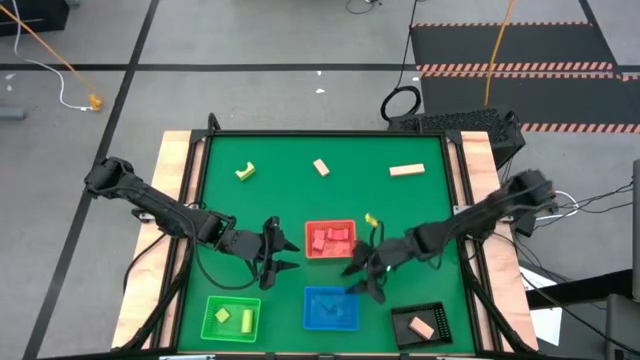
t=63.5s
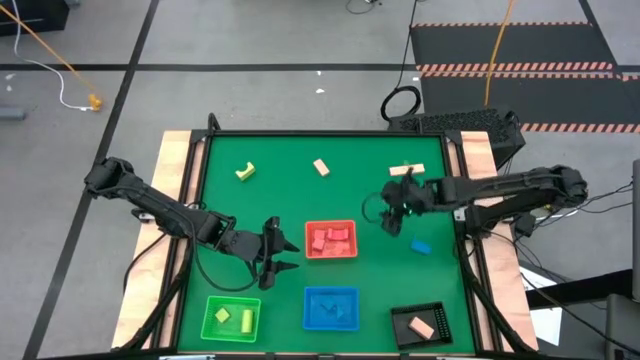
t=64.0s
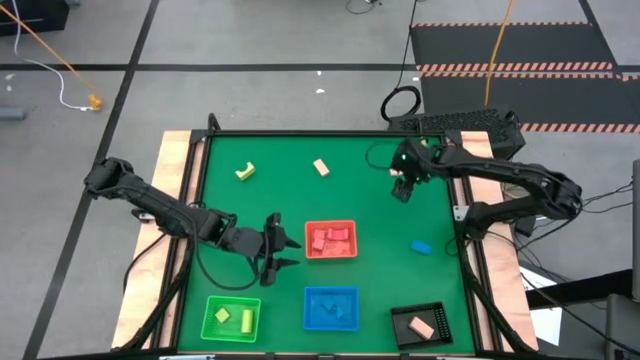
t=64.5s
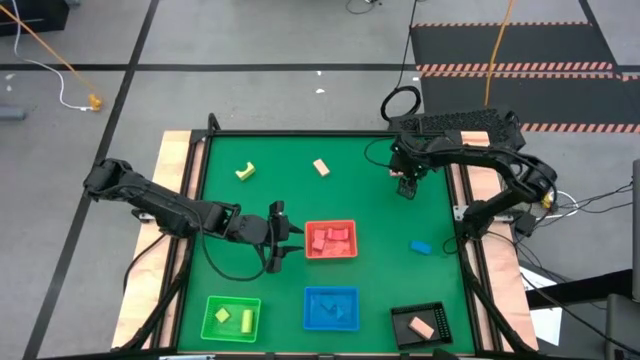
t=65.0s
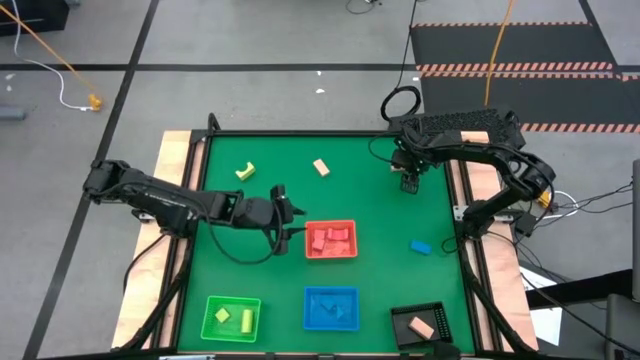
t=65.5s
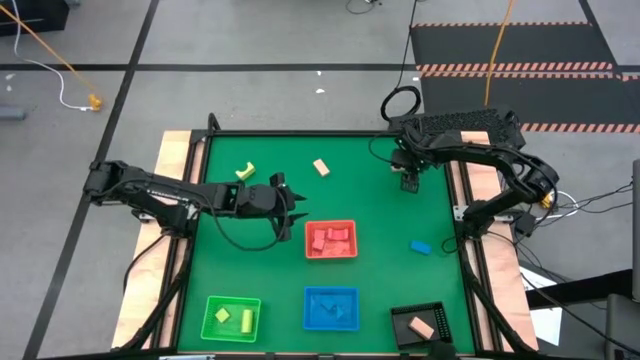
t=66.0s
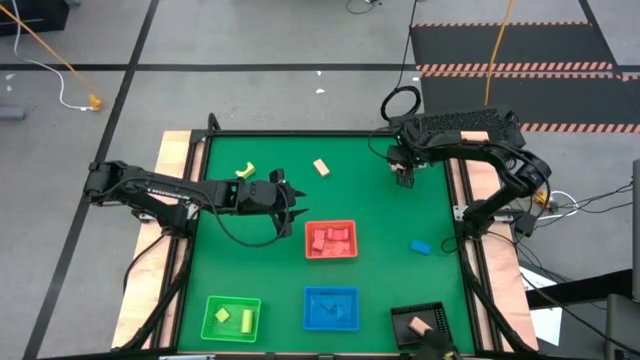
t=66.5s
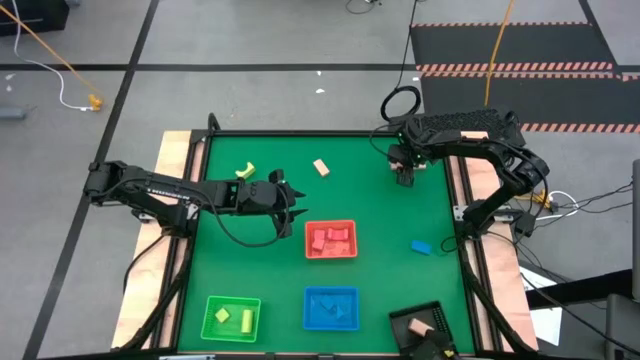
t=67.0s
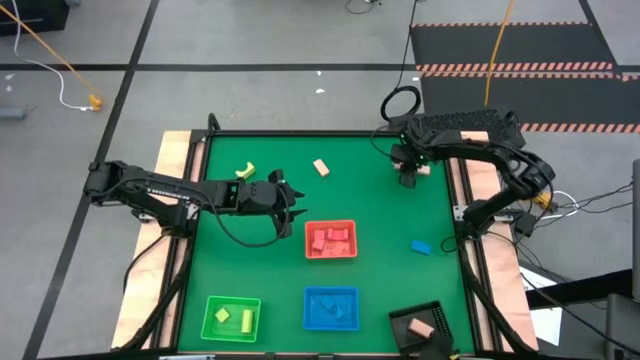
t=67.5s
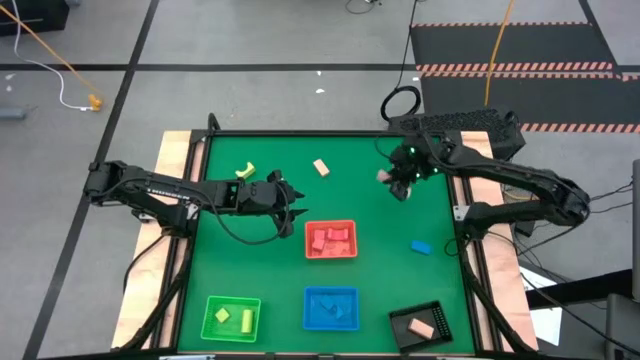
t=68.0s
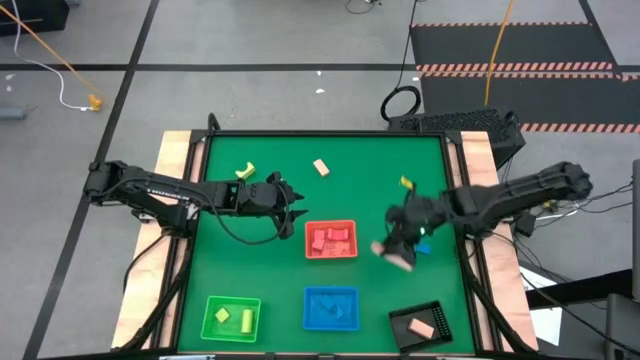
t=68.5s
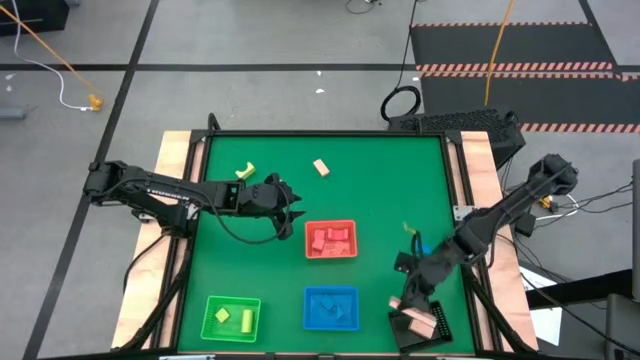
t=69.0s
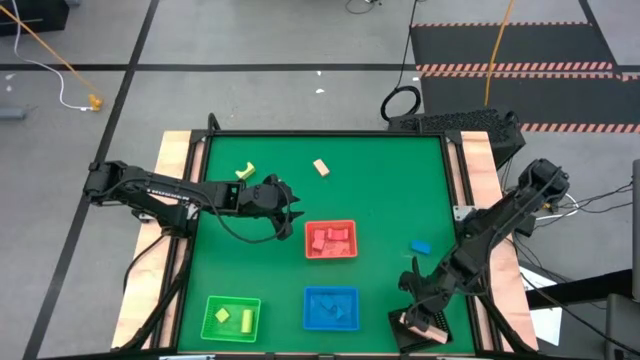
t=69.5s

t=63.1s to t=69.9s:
Task: Sort & place blocks by color
Put the right brown block into the black bin

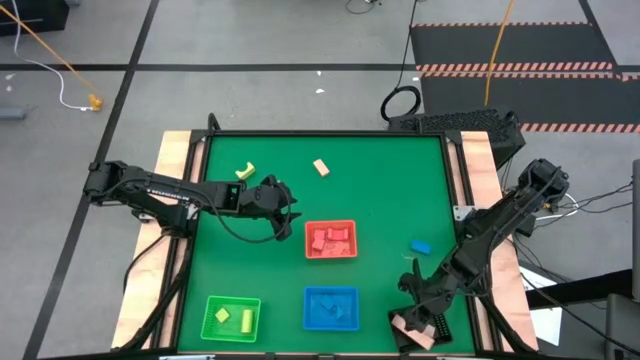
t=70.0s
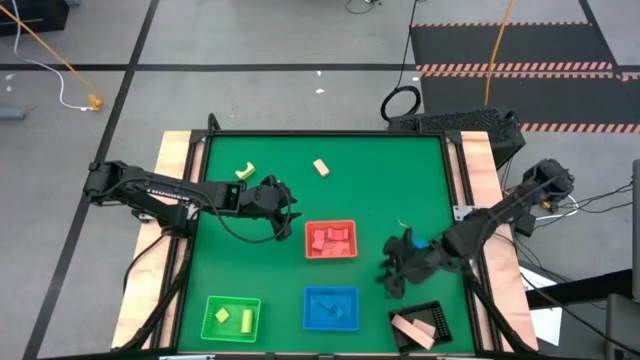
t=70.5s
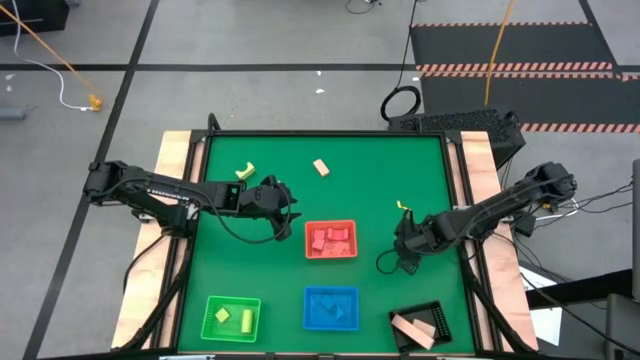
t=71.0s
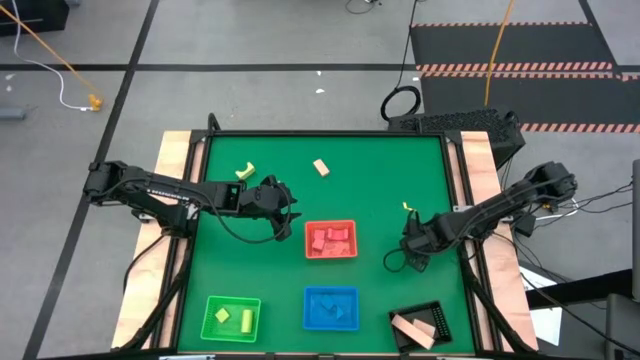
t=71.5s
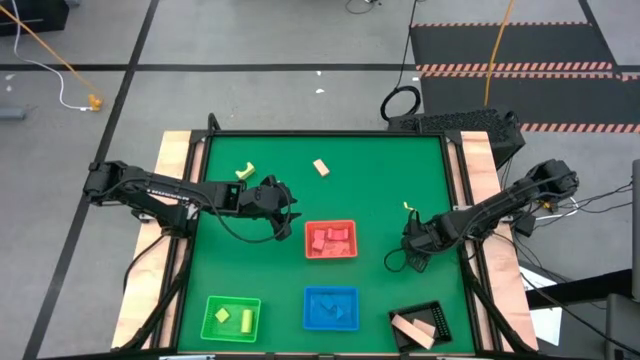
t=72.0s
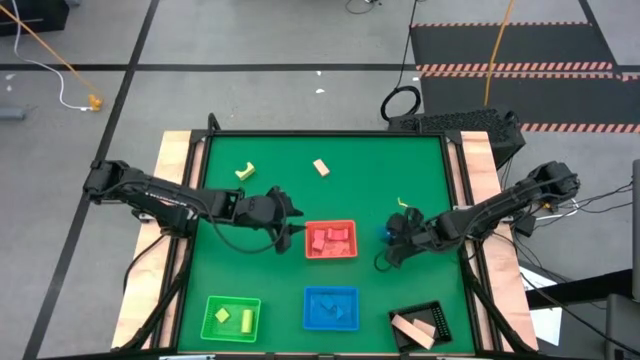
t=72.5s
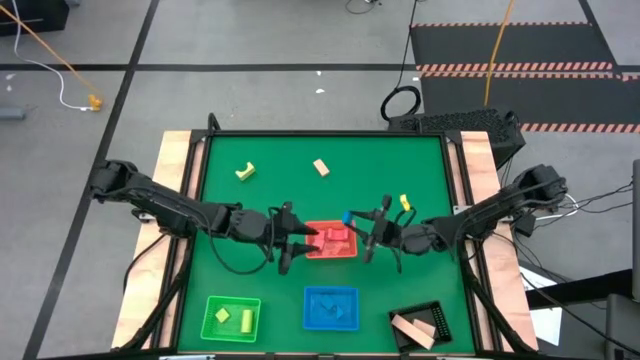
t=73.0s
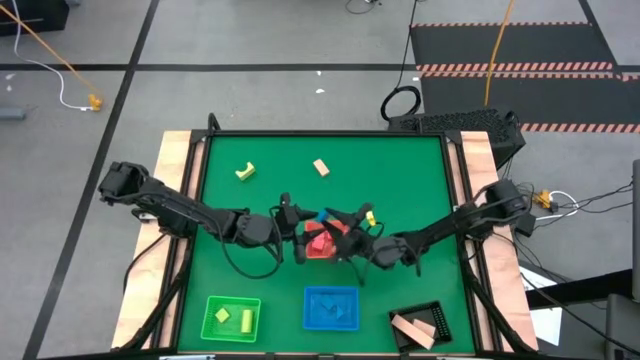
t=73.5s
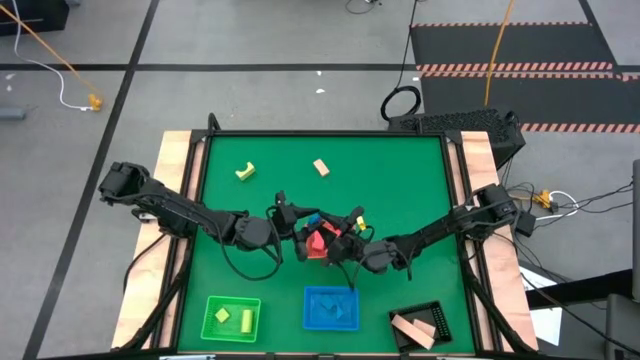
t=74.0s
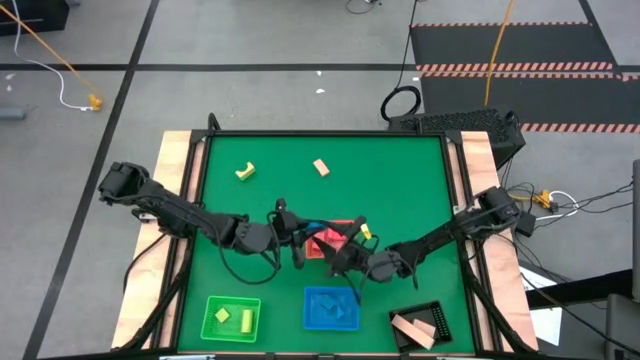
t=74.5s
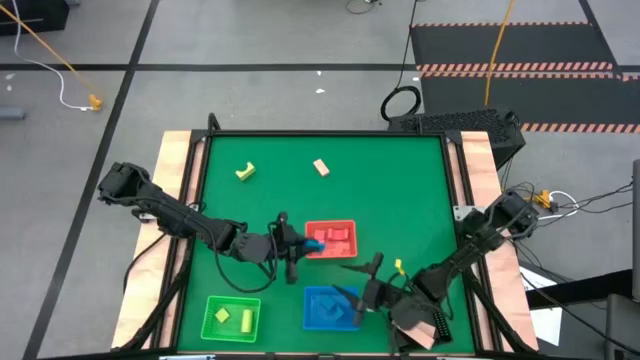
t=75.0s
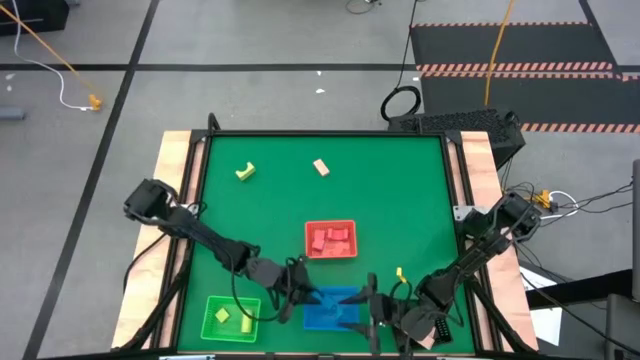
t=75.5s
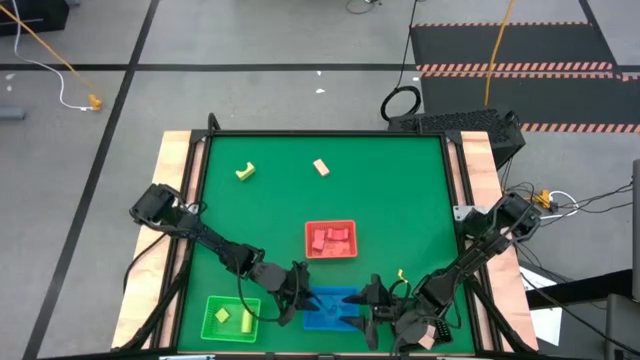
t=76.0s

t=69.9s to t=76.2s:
Put the blue block into the blue bin

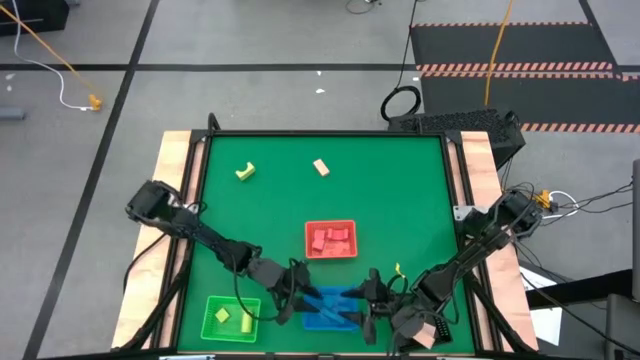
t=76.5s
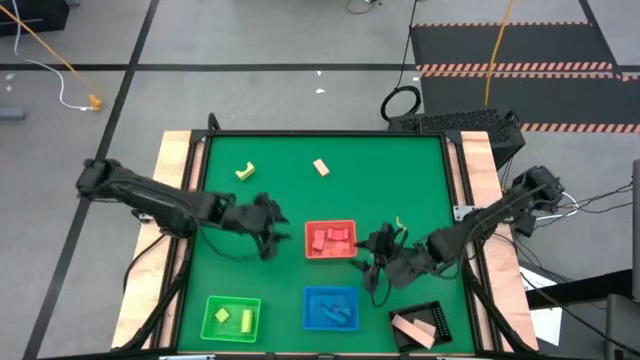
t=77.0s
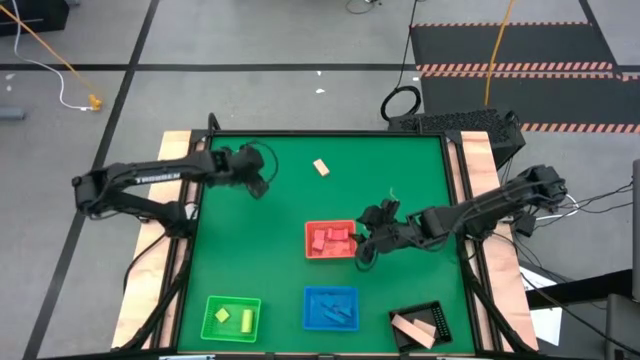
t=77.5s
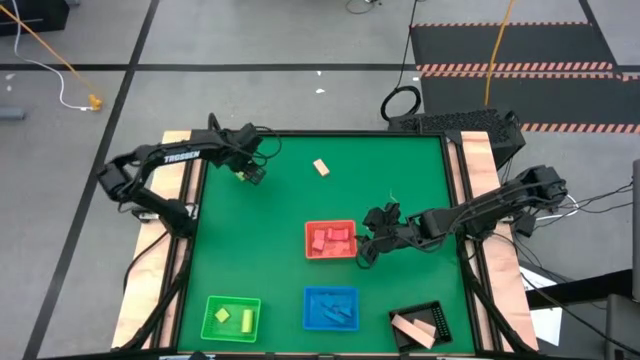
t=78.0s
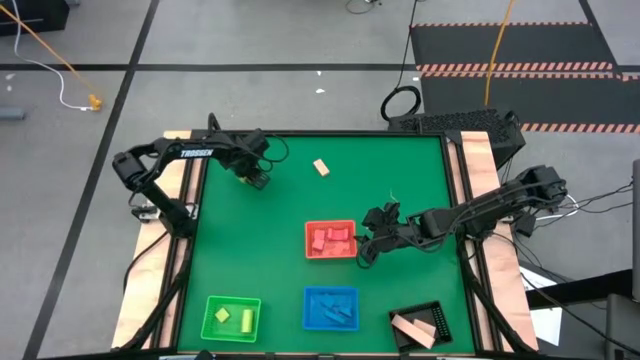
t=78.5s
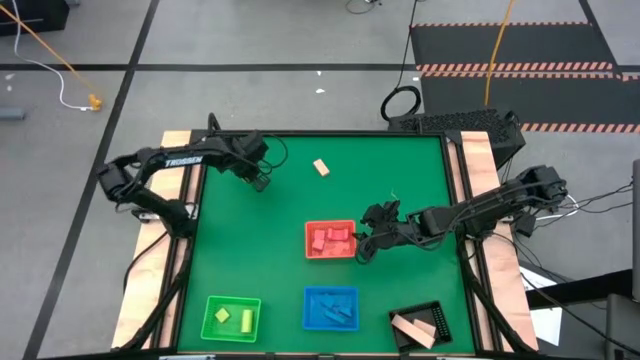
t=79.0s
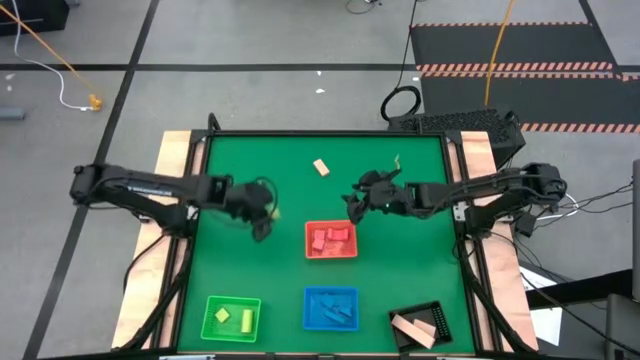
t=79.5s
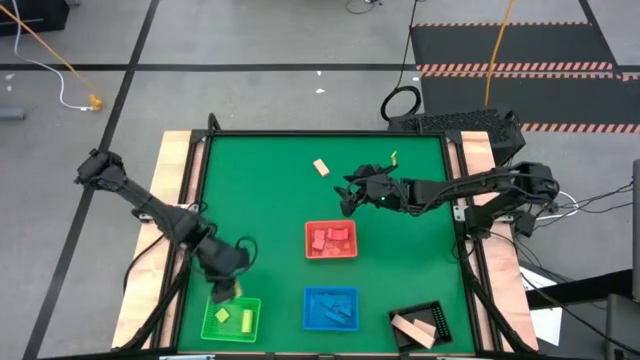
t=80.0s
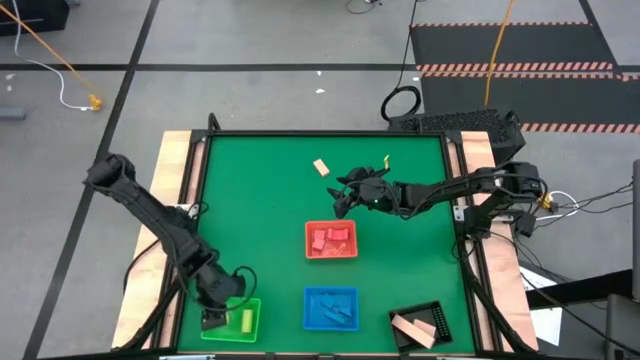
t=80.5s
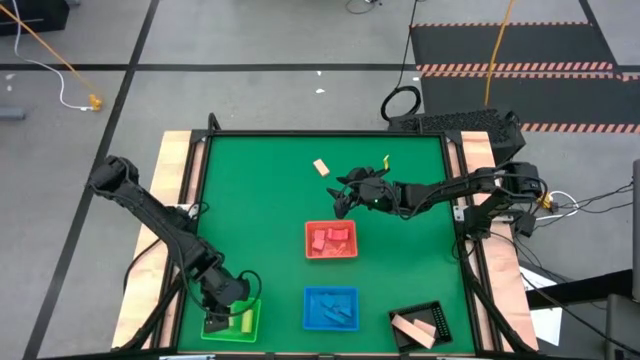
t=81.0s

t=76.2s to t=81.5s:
Put the green block into the green bin

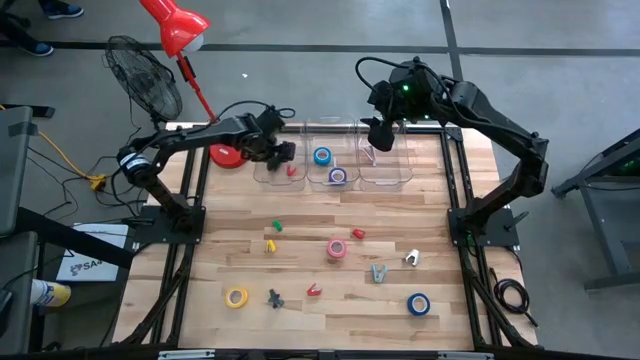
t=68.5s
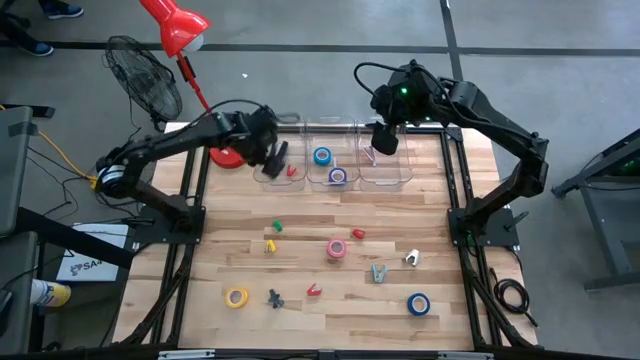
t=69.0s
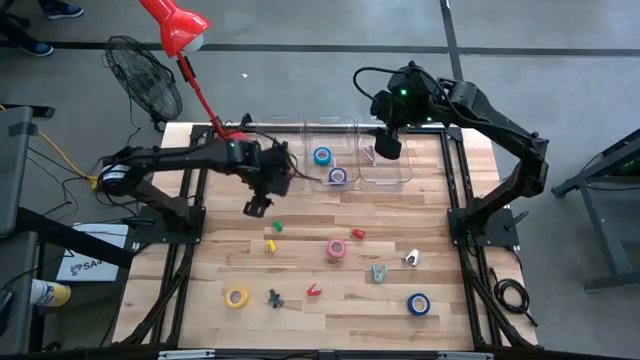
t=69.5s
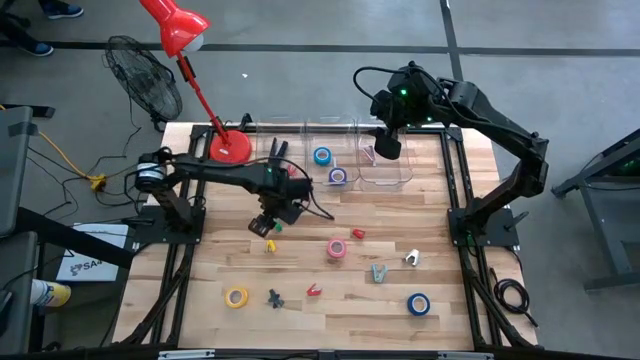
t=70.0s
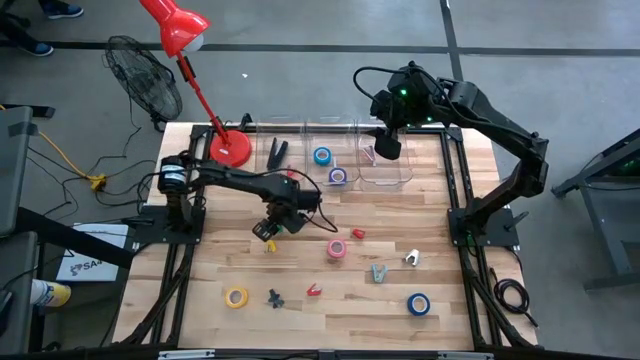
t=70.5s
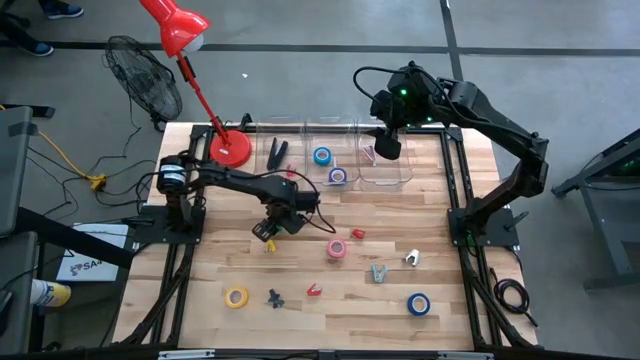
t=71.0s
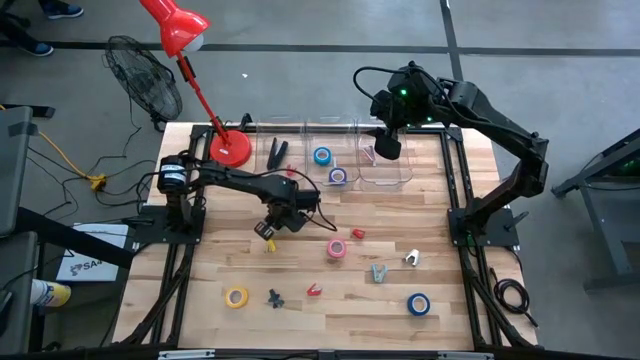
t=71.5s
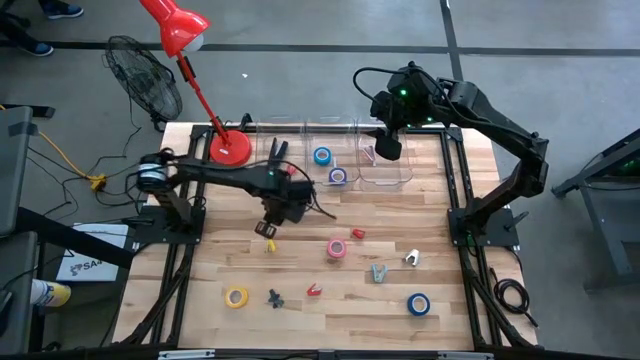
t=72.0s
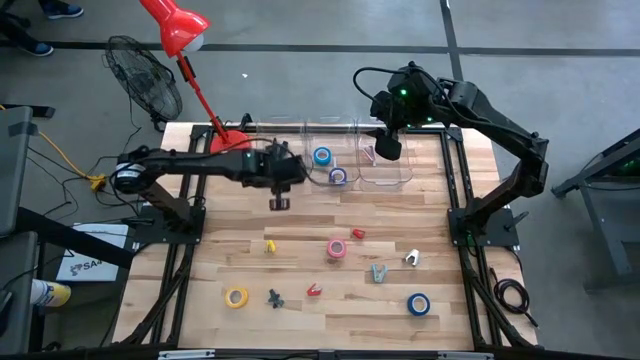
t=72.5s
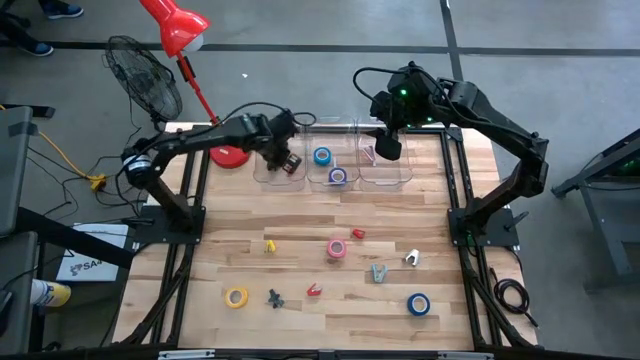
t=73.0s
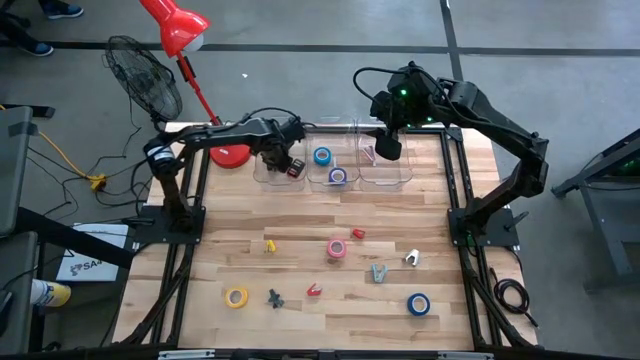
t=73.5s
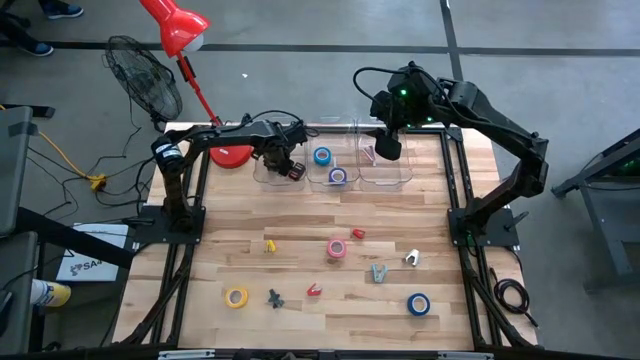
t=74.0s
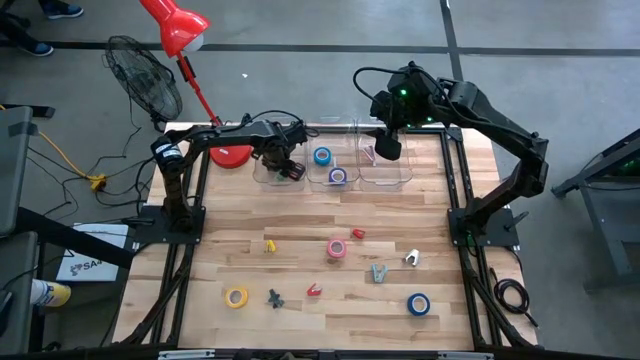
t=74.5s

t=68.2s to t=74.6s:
Task: Pick and place Stapler, Stapler remover, tape
Put the green stapler into the left transparent bin
